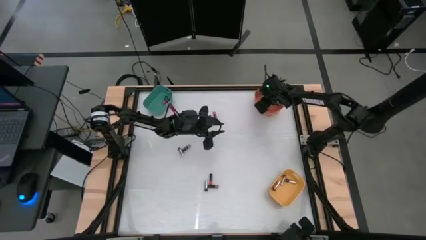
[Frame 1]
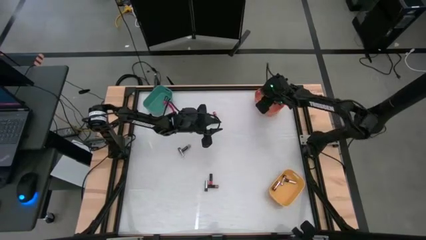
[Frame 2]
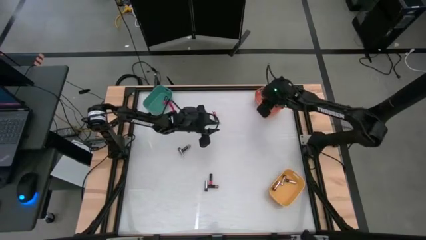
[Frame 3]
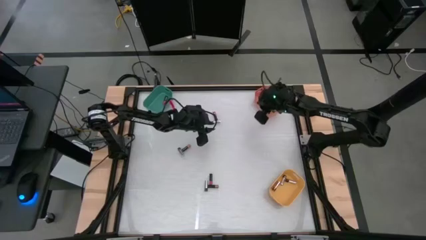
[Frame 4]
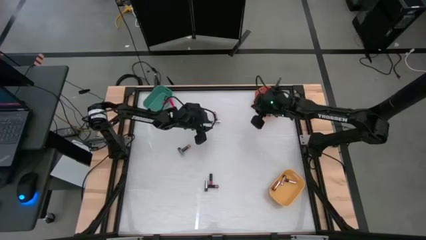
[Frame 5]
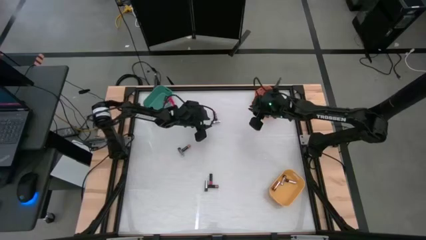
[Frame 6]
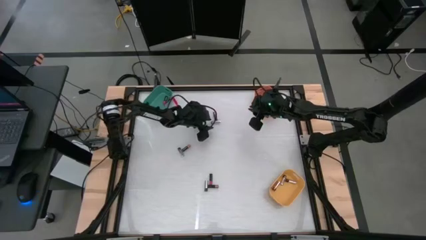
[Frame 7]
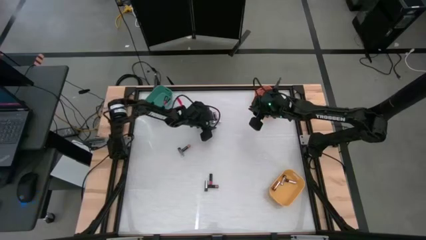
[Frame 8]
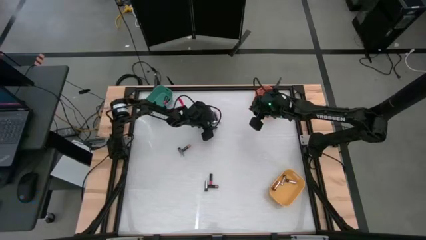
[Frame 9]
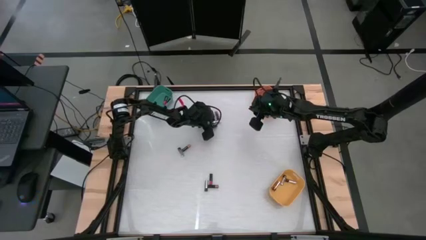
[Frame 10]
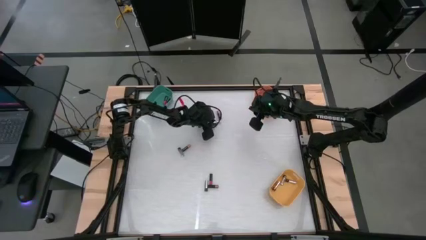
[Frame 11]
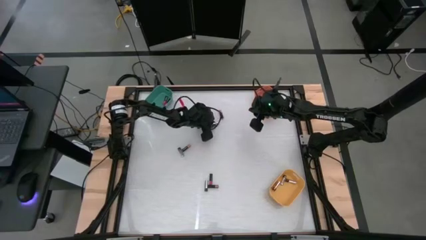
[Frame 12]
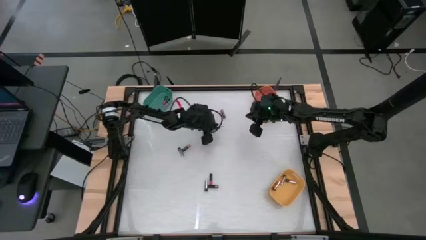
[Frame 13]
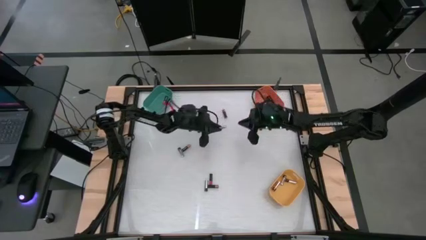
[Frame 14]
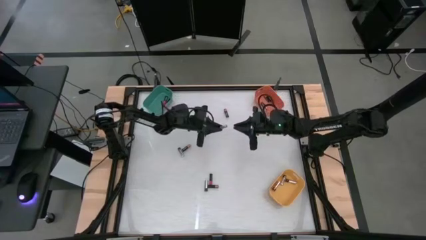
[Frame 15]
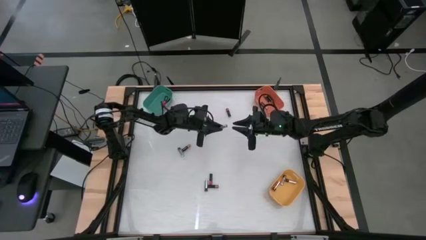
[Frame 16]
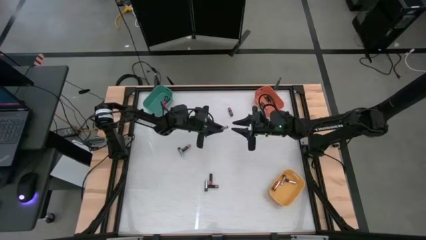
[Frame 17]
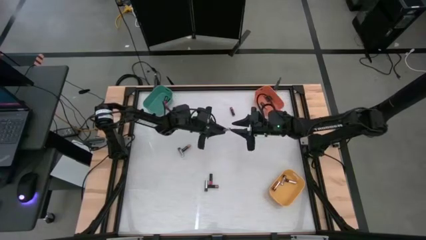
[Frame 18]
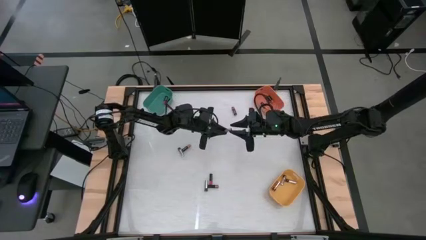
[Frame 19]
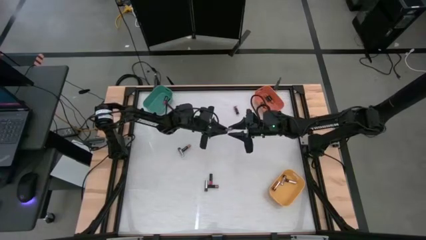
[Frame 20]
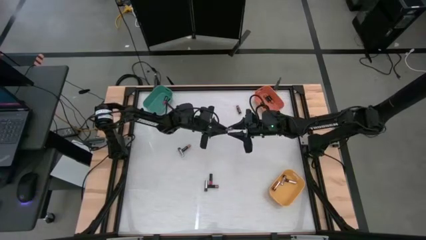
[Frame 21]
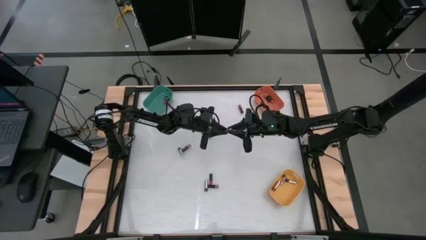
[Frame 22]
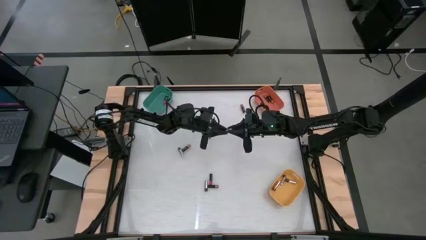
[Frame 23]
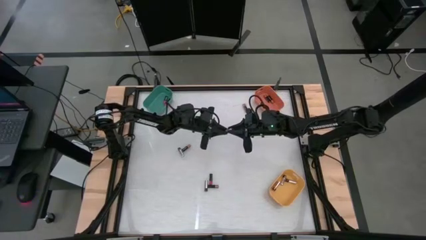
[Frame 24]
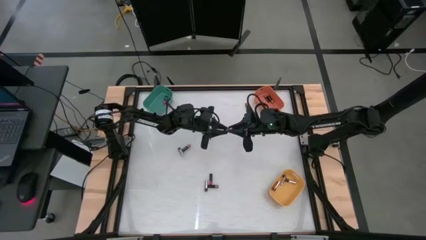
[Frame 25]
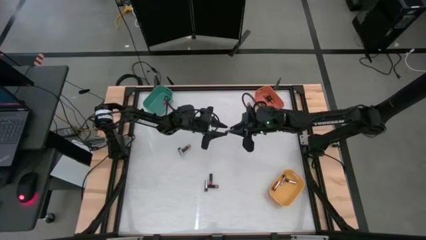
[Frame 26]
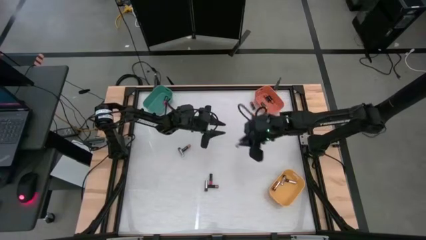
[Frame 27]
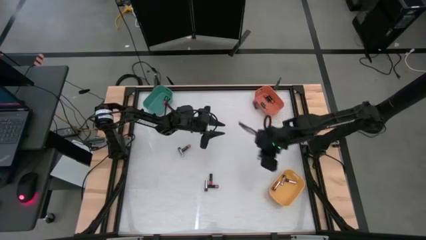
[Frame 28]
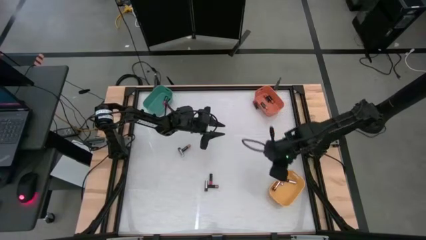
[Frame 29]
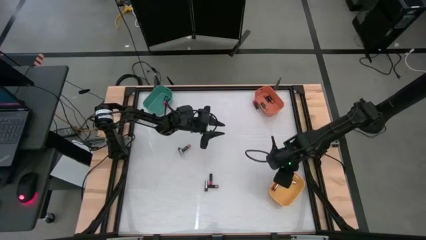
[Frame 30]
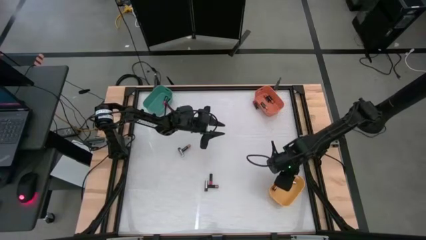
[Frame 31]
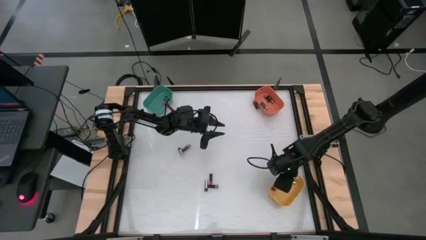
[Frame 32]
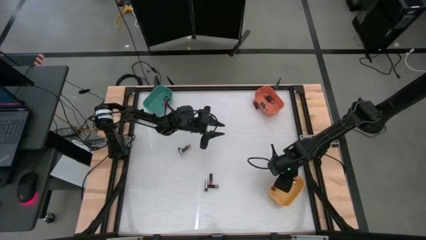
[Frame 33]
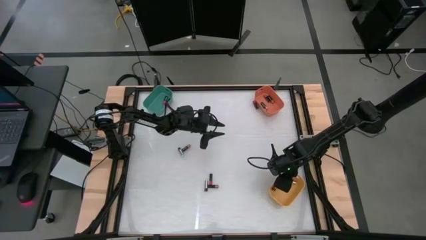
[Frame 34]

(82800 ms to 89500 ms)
Task: Sort batteries
Put the silver battery into the yellow bin

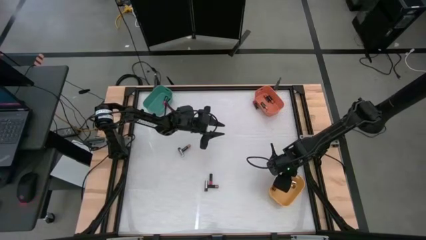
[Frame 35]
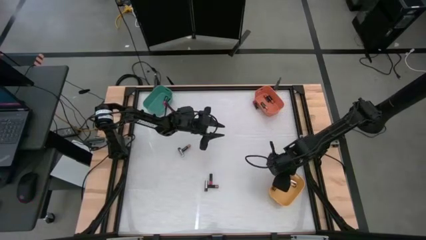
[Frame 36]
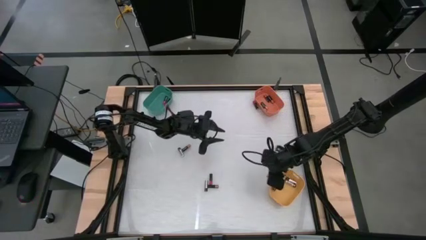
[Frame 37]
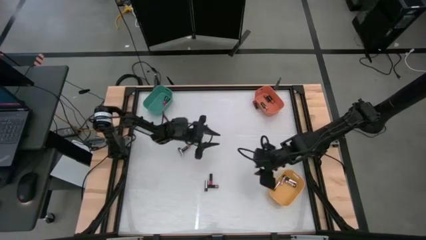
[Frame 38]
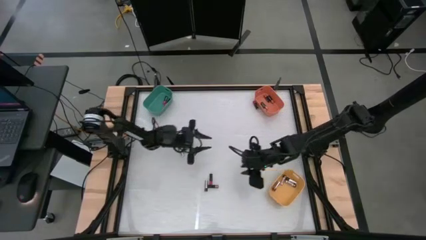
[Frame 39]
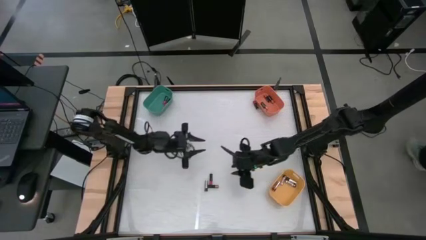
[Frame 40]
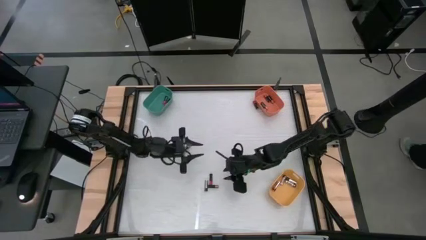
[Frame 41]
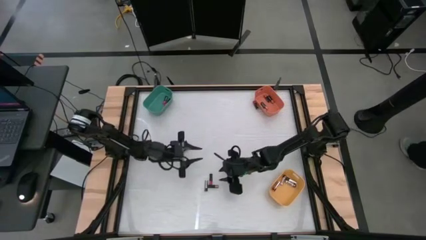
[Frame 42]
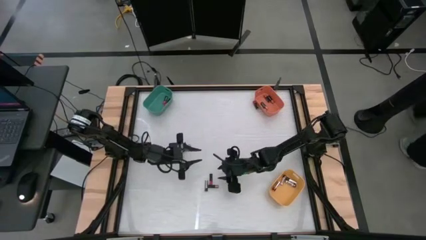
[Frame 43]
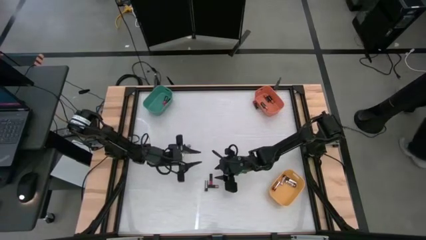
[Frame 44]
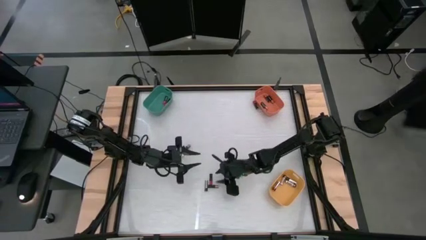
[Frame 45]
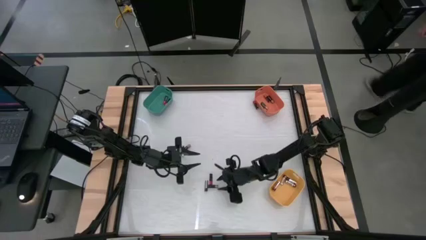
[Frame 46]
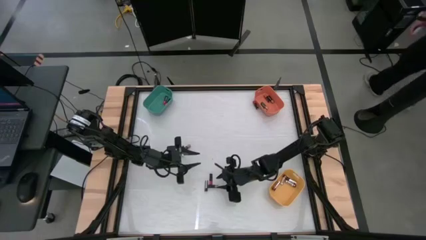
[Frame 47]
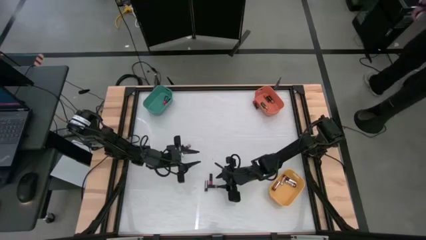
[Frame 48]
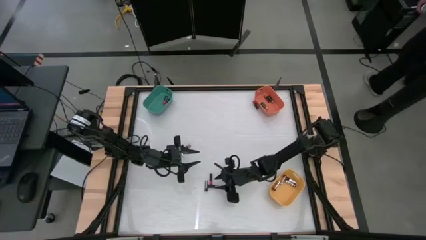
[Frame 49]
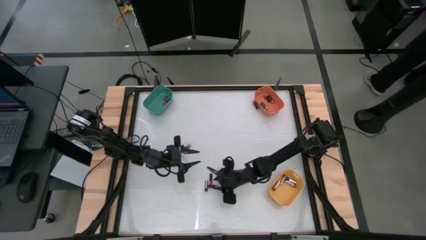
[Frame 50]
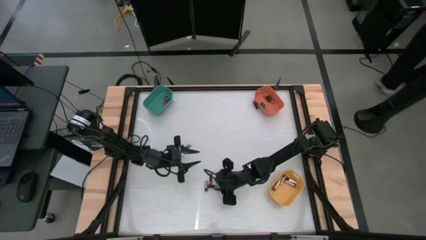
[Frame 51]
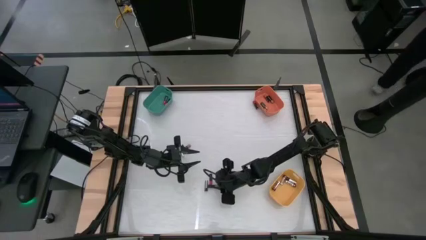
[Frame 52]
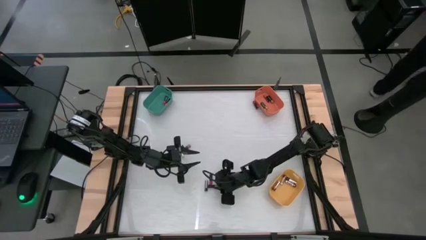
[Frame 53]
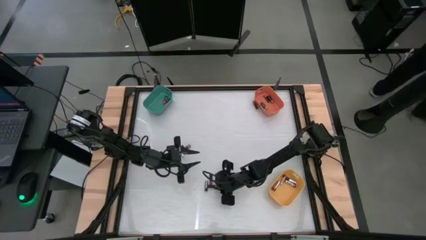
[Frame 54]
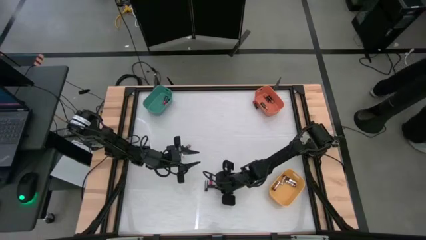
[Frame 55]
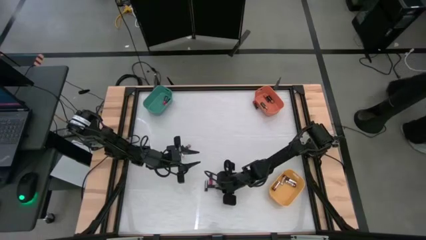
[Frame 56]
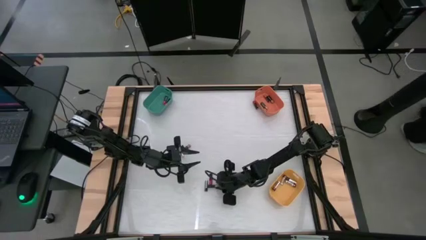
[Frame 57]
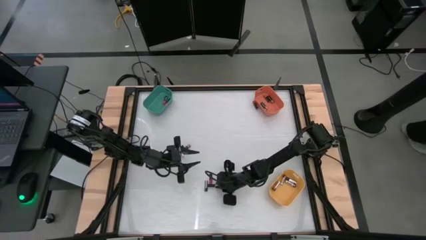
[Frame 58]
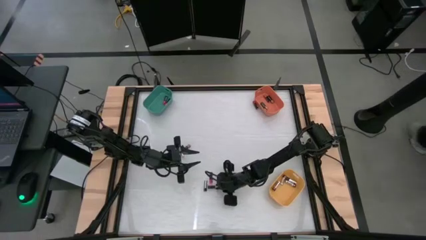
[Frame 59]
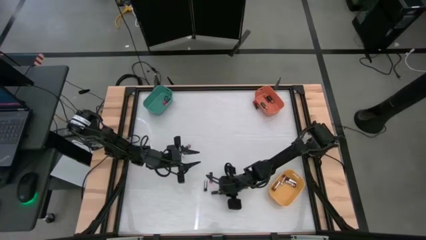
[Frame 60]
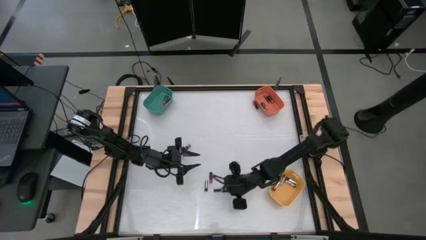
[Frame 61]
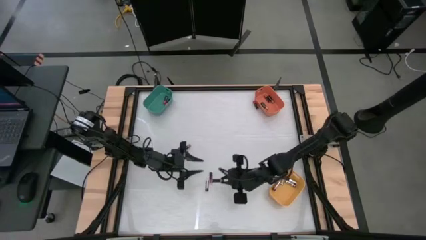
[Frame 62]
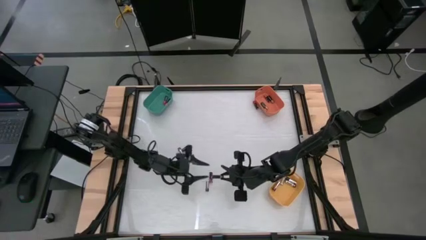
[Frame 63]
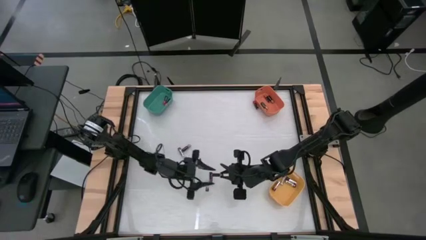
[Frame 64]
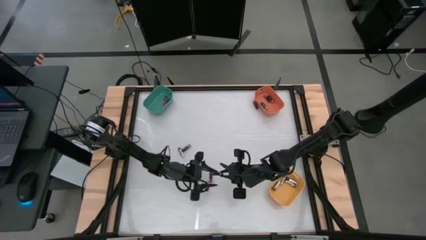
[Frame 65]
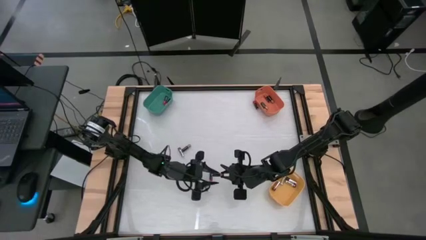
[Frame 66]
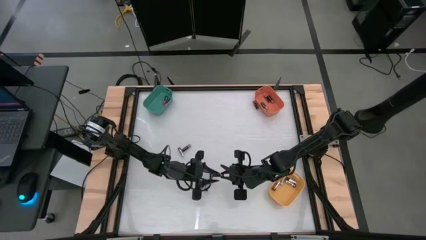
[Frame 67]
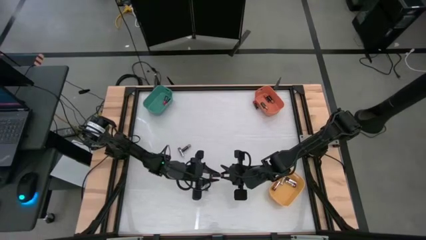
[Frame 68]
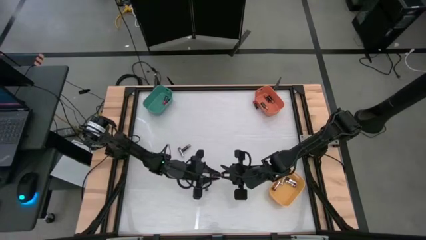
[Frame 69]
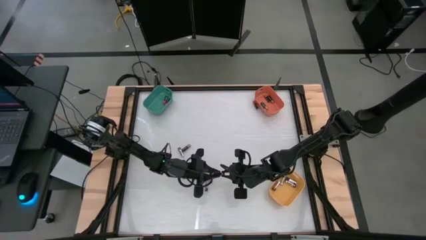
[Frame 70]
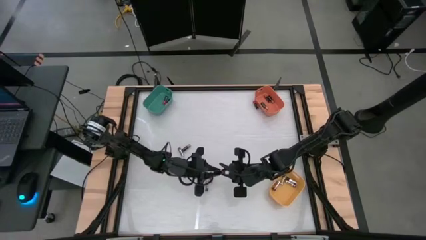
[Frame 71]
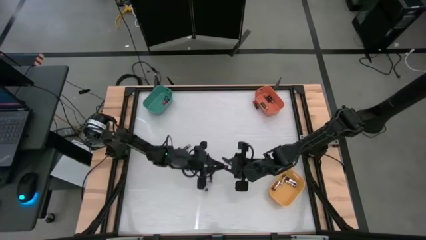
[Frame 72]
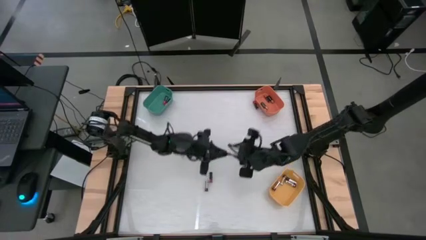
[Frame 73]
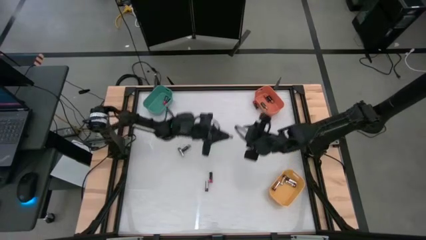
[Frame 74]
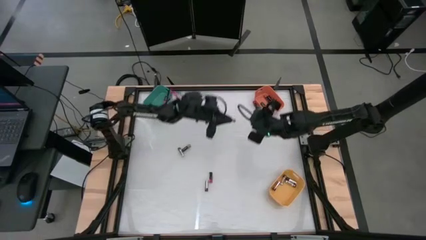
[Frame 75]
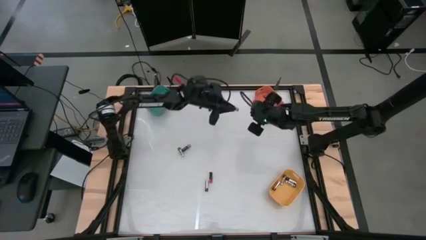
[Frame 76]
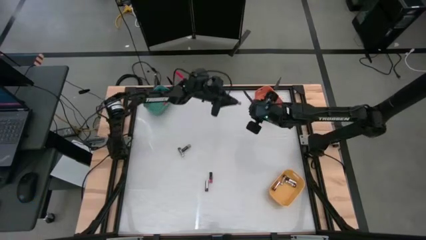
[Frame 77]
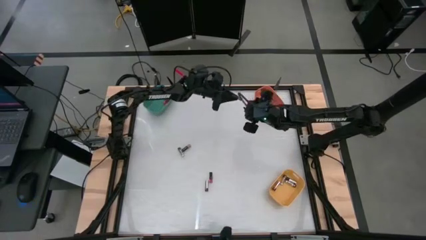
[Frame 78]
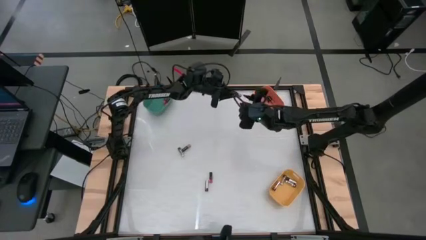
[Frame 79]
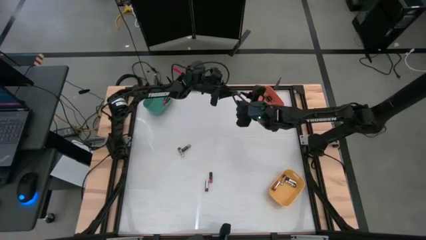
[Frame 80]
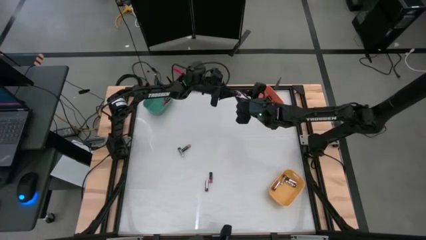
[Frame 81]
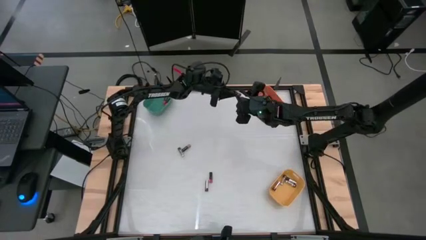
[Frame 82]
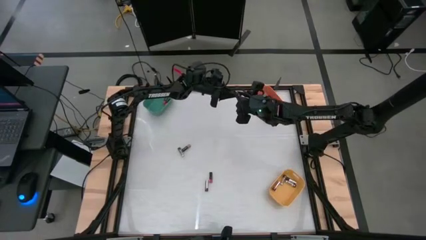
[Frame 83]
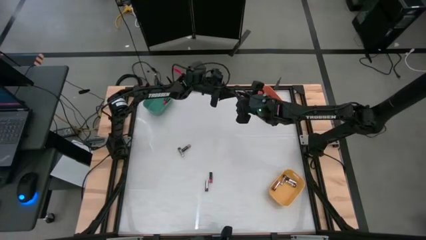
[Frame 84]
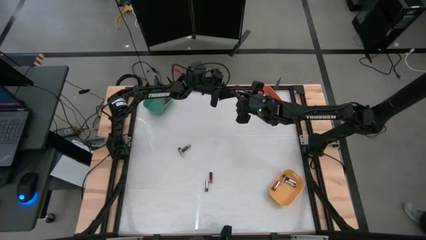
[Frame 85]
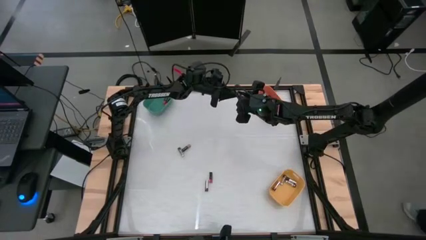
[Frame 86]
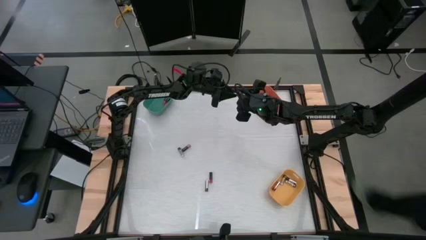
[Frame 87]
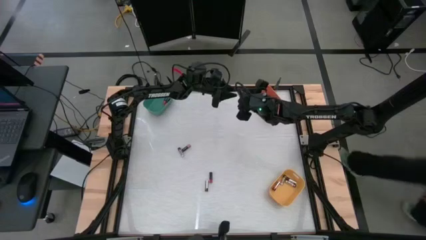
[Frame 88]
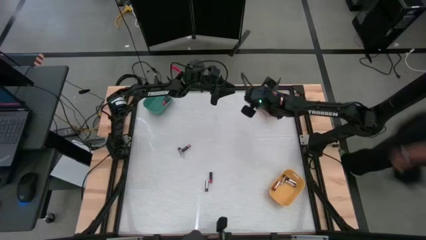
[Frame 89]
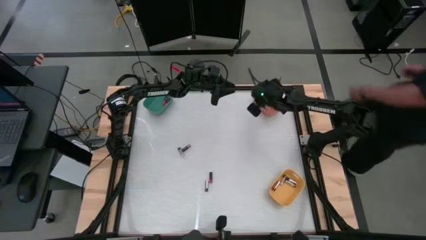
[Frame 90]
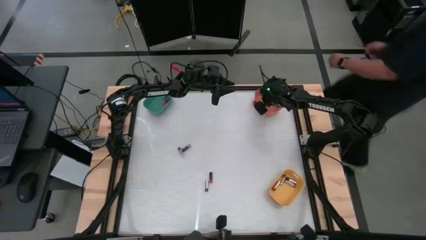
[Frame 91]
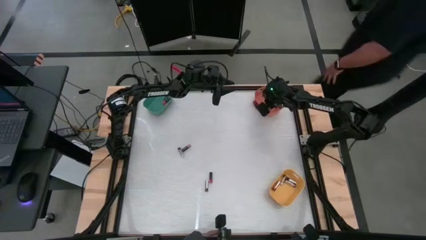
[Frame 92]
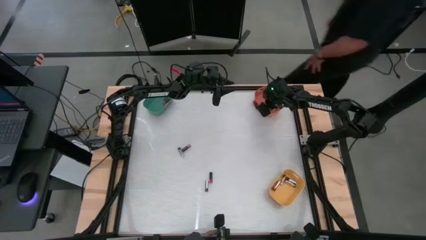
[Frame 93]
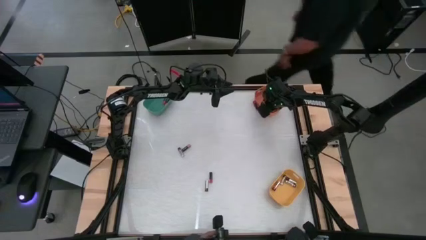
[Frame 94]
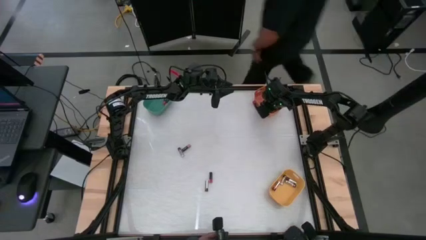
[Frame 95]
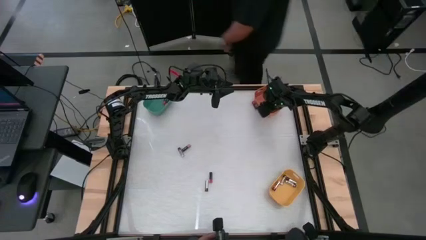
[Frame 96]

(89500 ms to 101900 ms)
Put the black battery into the orange bin
